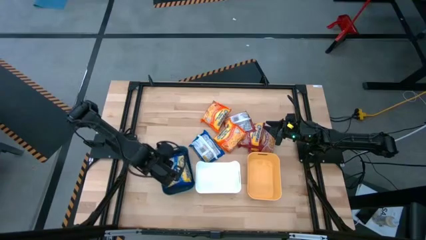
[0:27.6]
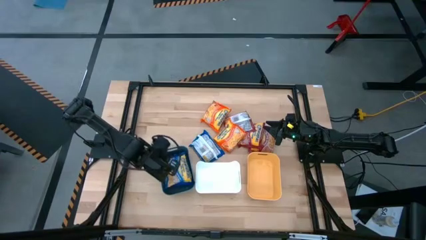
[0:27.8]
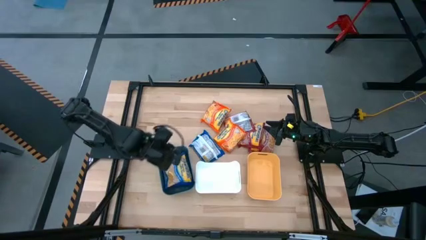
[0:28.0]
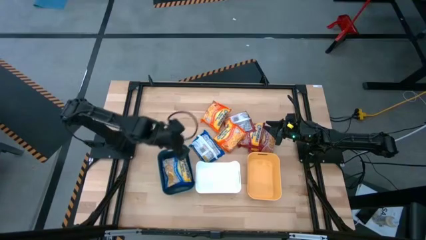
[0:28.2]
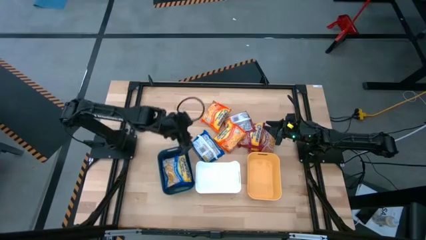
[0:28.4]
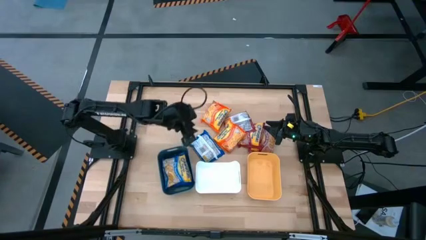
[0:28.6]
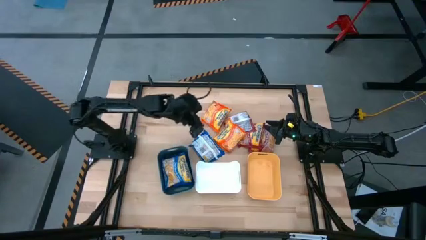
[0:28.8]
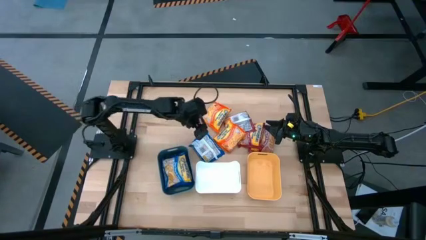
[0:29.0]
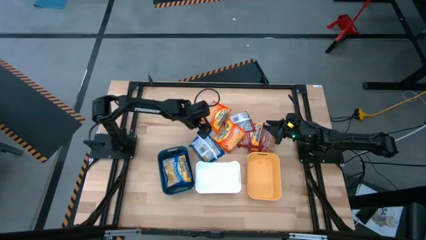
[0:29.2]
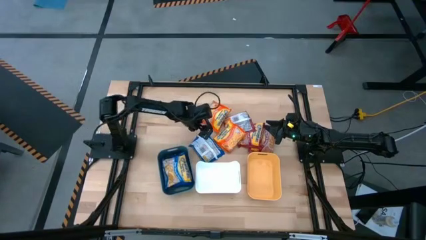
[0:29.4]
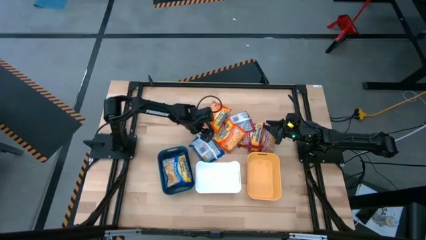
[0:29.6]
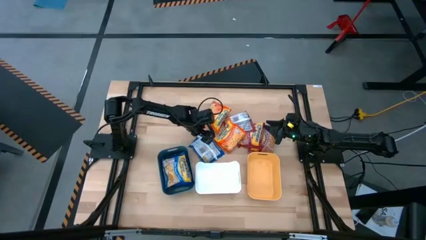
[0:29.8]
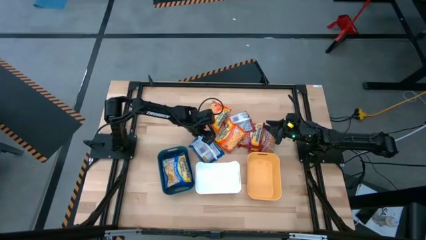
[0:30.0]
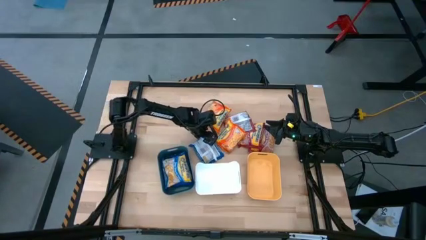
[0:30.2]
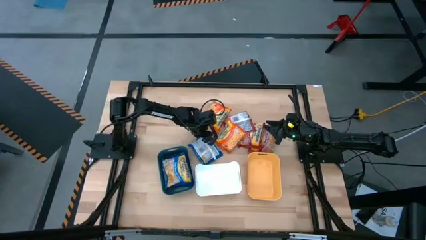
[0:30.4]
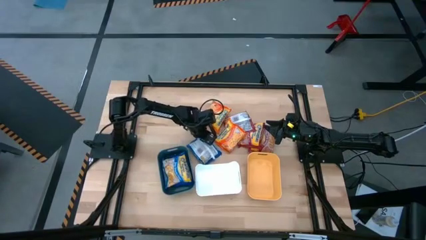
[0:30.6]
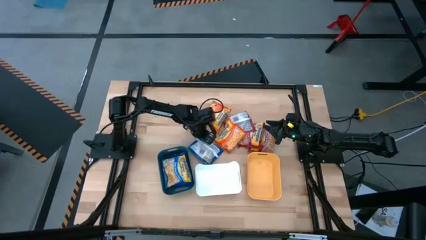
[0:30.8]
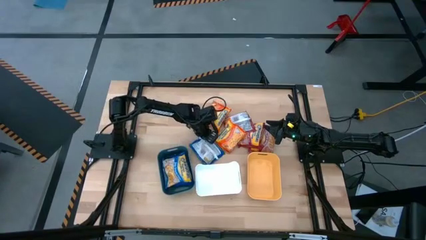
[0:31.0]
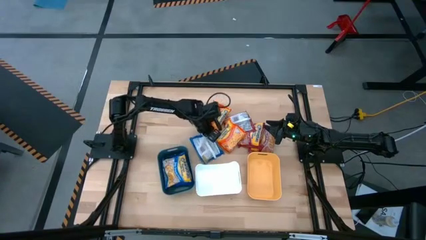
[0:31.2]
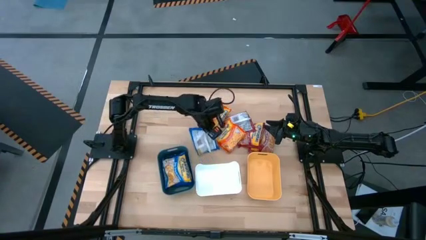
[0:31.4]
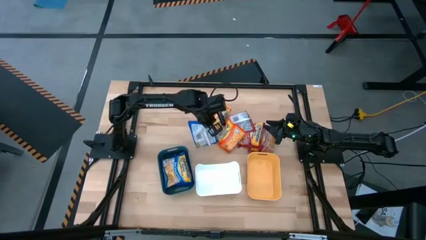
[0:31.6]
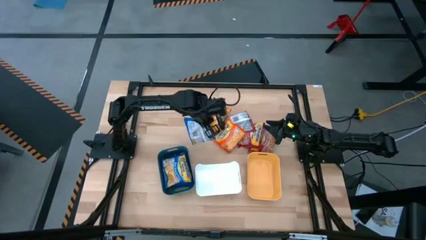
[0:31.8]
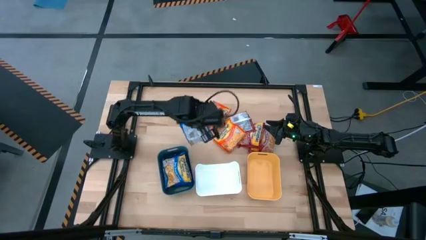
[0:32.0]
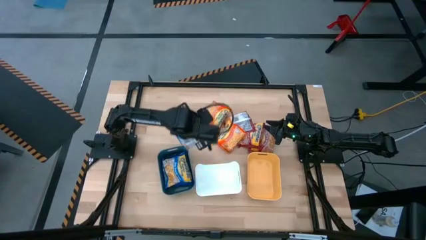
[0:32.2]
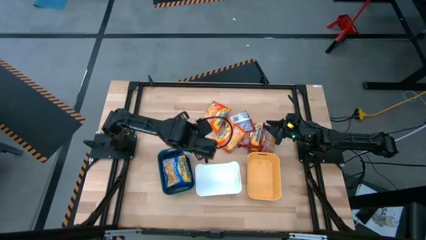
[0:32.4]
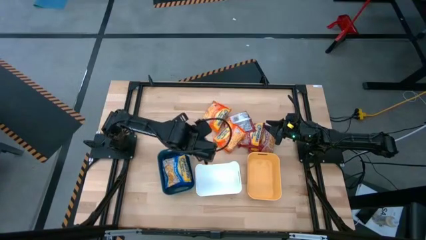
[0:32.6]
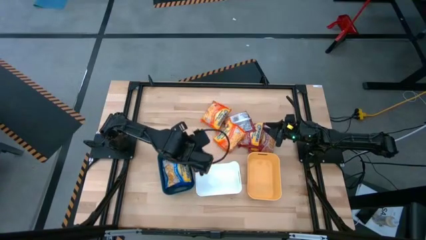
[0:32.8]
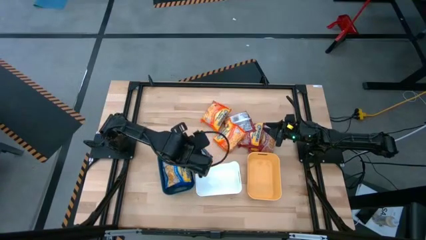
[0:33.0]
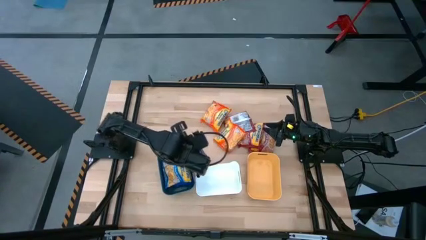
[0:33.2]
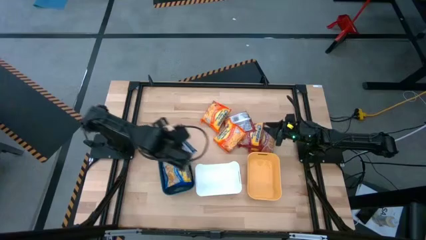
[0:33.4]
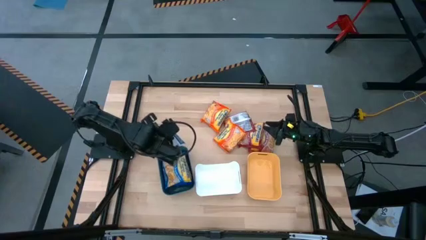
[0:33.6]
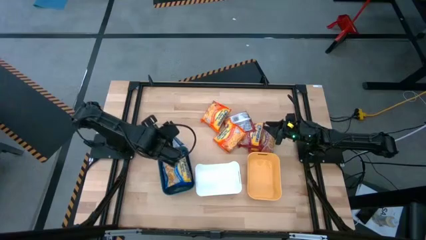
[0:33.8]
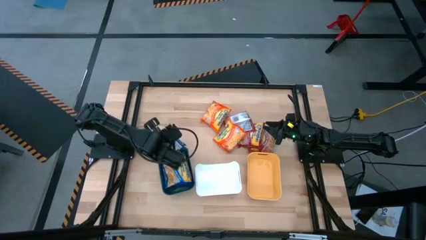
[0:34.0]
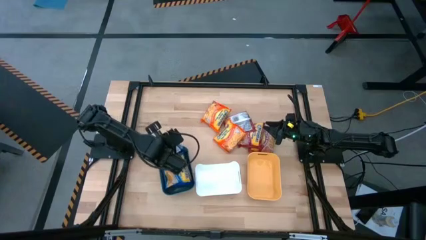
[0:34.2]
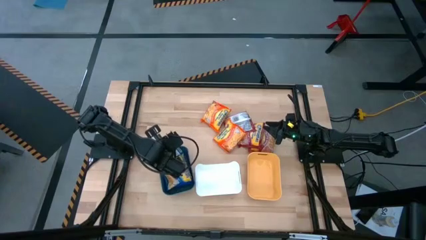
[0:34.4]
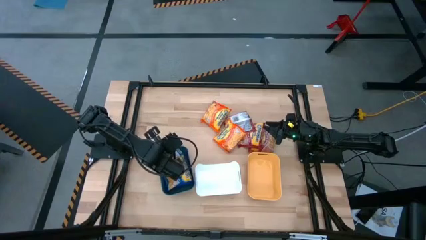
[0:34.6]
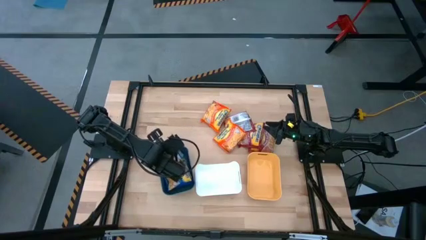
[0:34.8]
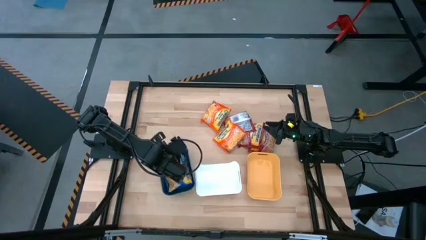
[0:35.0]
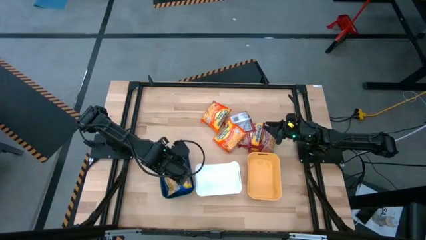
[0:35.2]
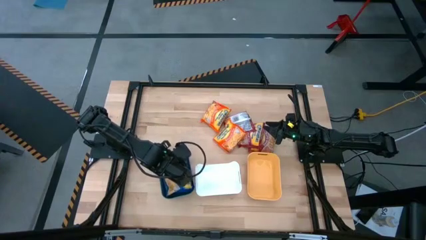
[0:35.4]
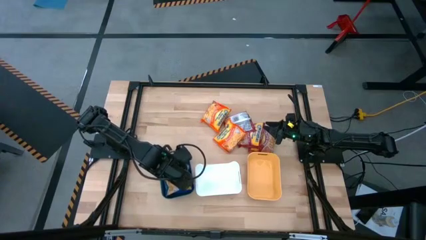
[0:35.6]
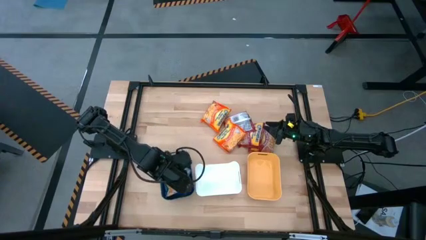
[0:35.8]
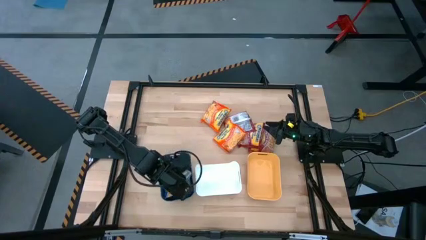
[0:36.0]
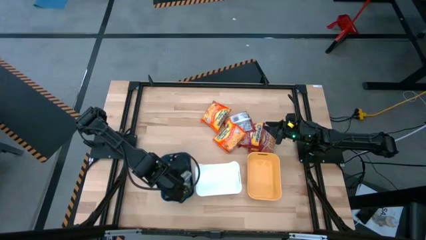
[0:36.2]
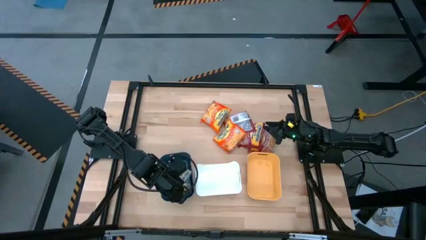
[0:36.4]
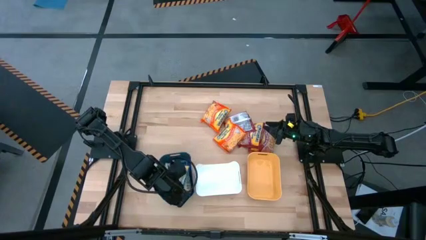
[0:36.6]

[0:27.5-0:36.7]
Task: Sort Maruchan noodles
Put the blue noodle pack into the blue bin

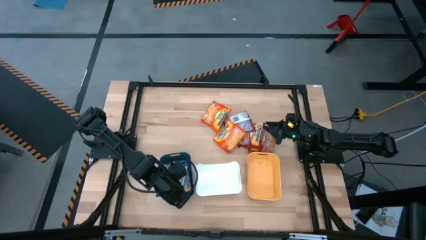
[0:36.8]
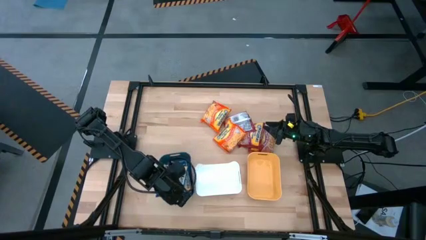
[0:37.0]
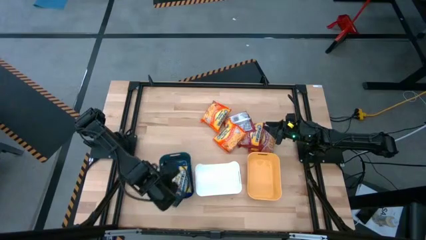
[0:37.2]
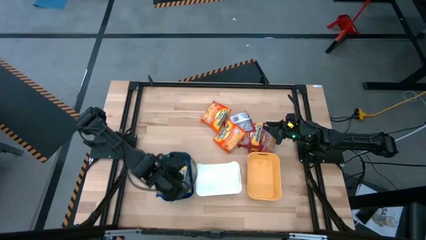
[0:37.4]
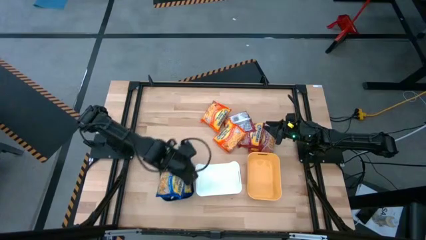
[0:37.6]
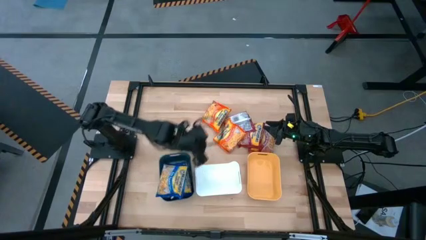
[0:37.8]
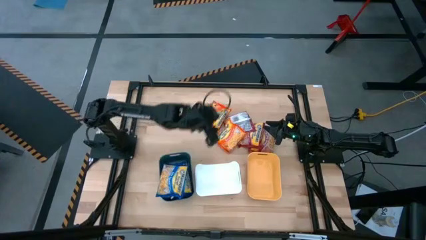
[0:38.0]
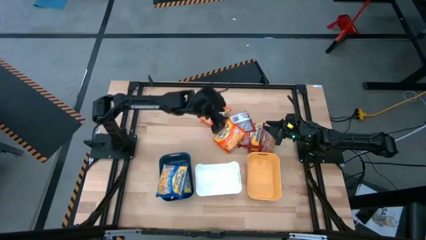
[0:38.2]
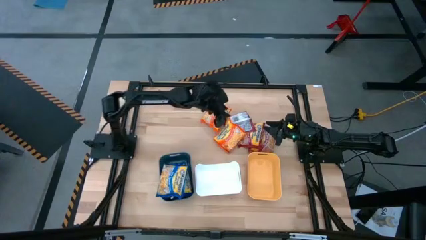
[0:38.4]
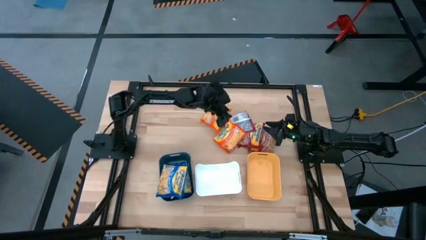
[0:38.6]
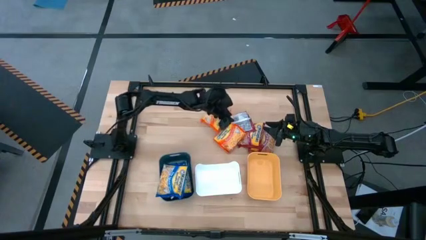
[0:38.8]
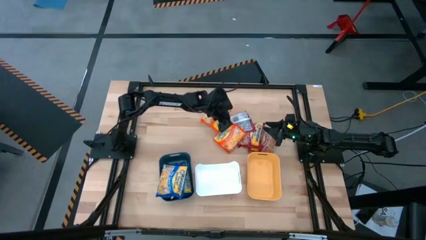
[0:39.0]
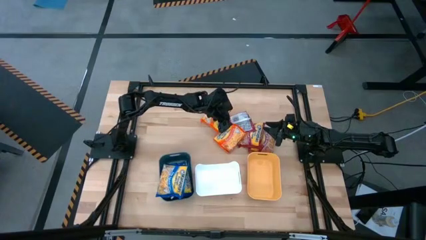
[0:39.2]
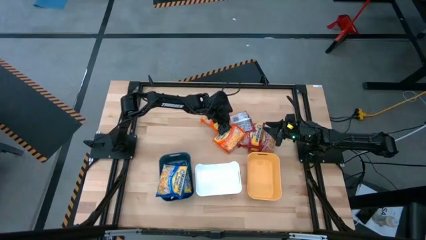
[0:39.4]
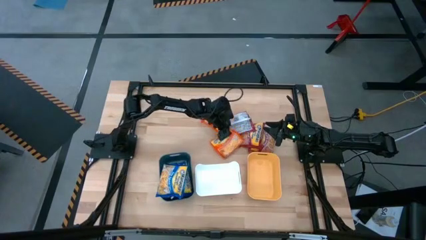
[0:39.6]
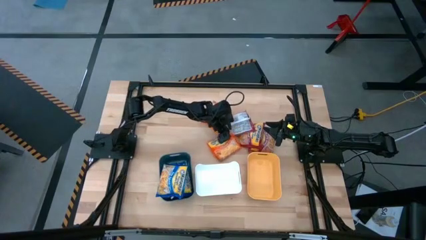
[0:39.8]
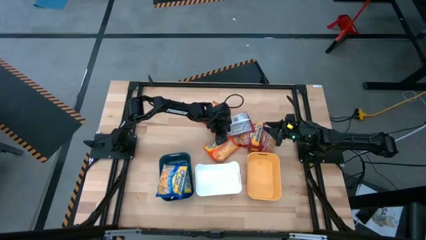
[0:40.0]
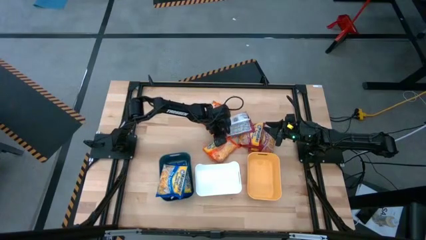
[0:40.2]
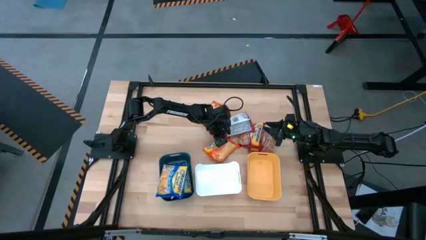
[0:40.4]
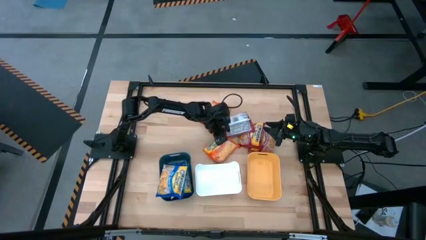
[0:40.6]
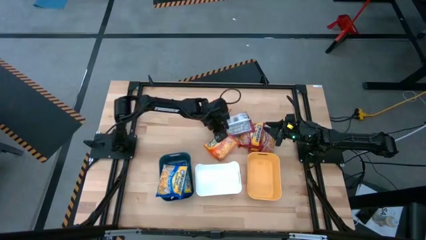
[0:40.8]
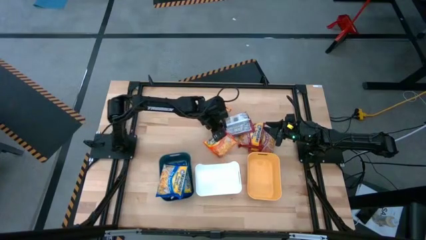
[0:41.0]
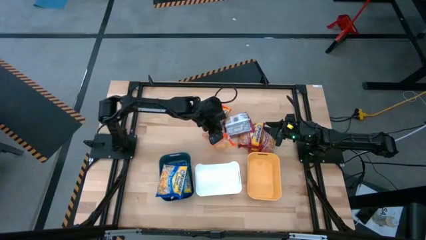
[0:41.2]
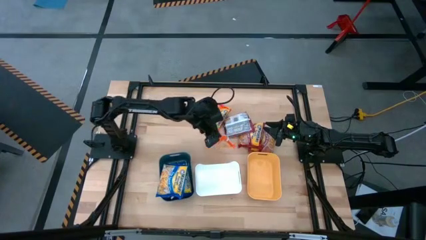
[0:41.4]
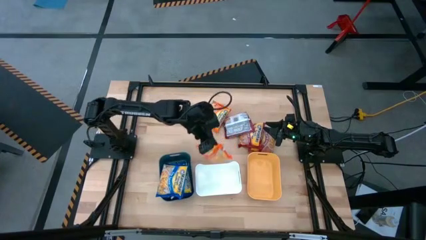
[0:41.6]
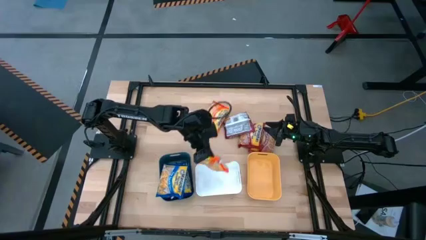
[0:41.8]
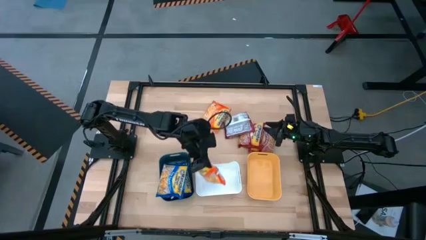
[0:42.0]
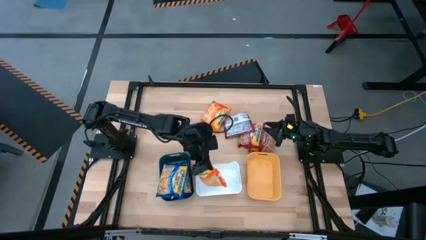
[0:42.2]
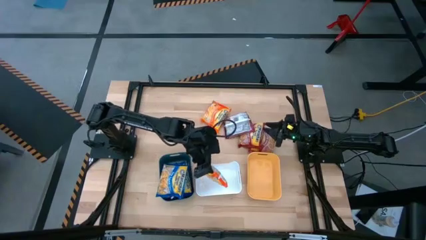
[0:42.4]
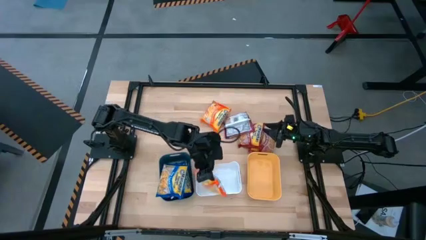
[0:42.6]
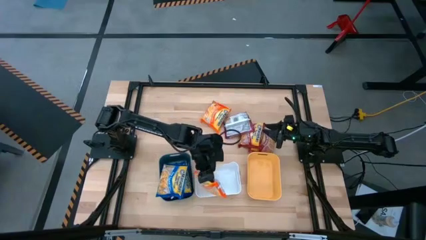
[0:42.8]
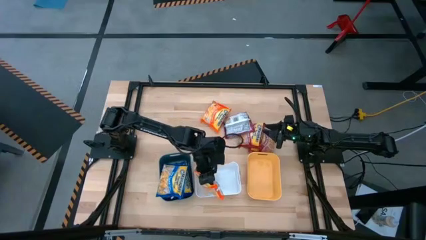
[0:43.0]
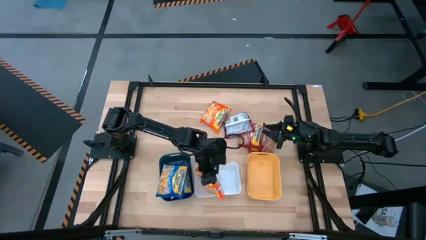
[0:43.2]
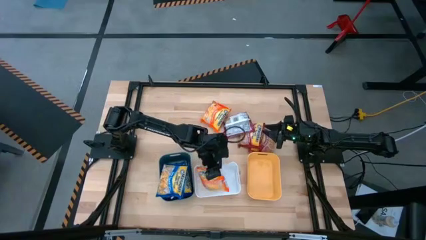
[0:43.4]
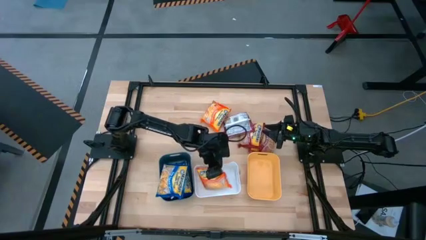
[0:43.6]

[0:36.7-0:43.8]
Put the bottom orange noodle pack into the white bin
